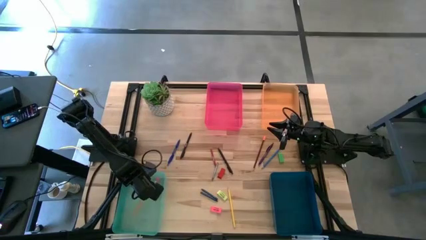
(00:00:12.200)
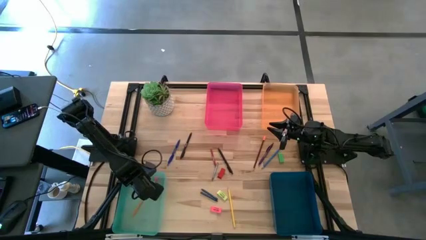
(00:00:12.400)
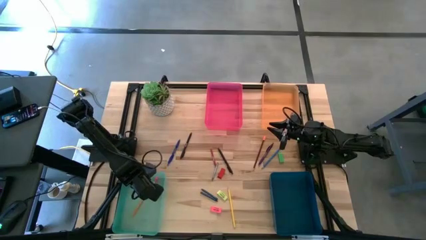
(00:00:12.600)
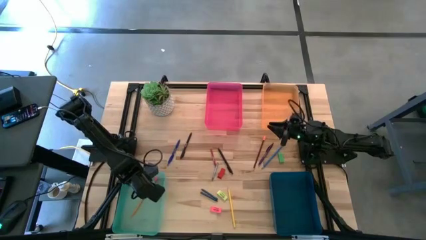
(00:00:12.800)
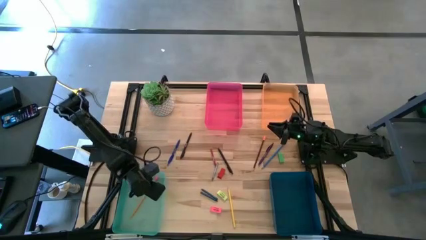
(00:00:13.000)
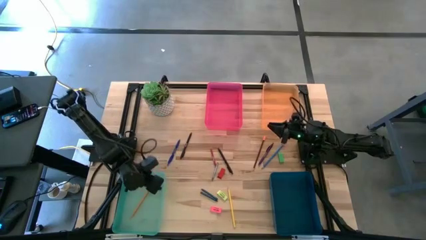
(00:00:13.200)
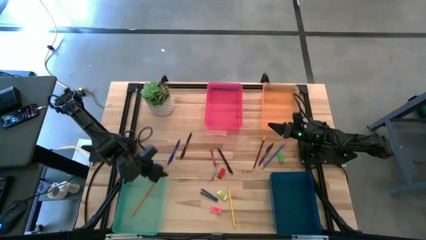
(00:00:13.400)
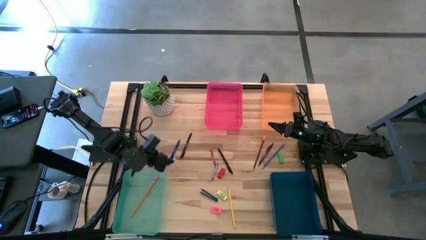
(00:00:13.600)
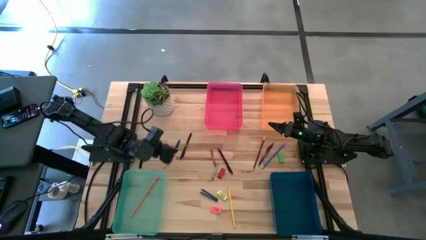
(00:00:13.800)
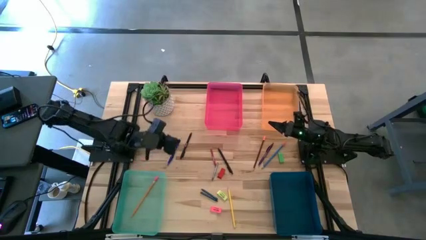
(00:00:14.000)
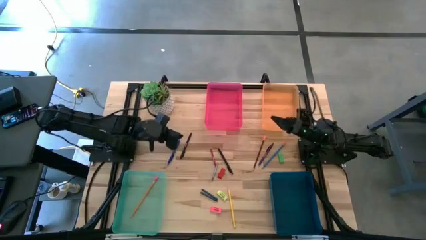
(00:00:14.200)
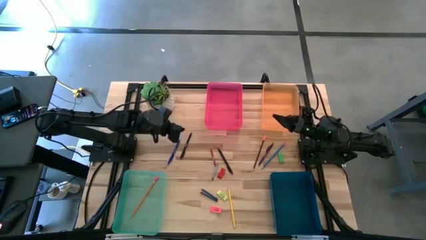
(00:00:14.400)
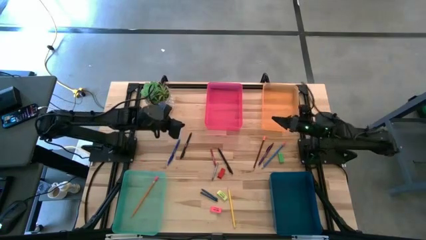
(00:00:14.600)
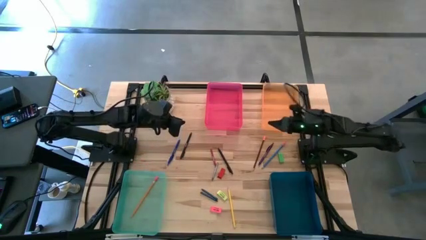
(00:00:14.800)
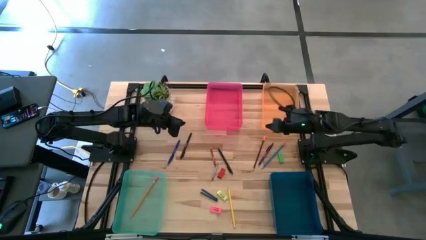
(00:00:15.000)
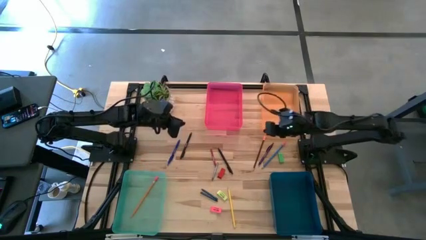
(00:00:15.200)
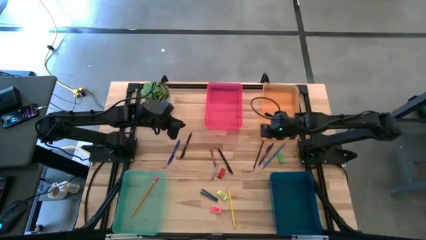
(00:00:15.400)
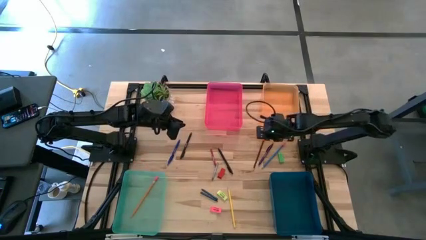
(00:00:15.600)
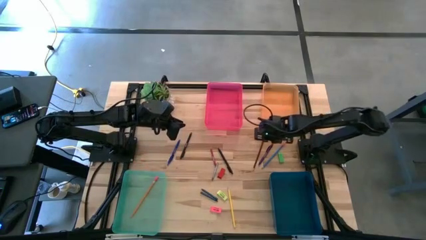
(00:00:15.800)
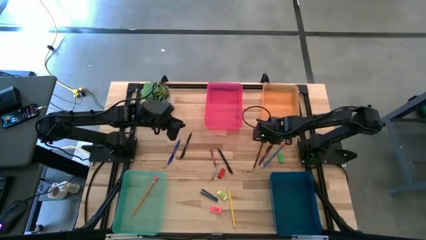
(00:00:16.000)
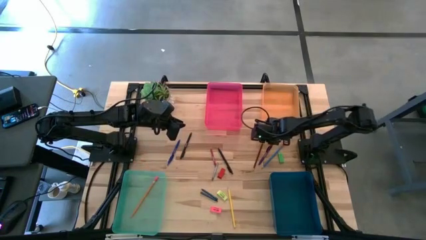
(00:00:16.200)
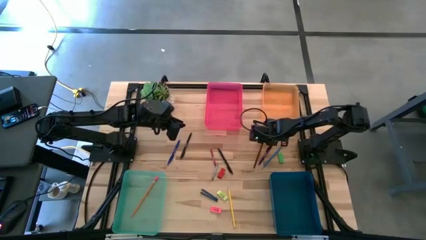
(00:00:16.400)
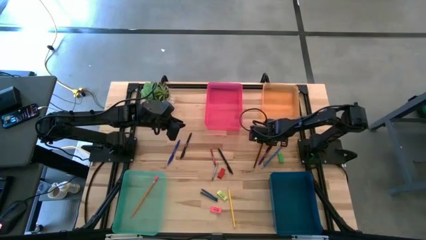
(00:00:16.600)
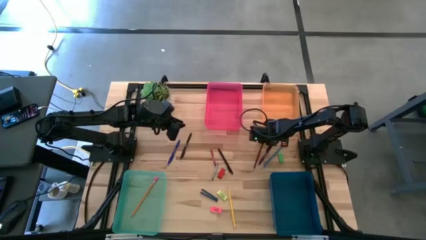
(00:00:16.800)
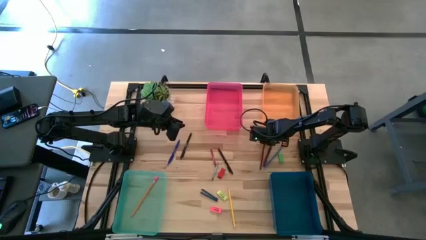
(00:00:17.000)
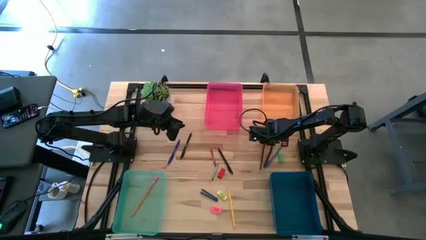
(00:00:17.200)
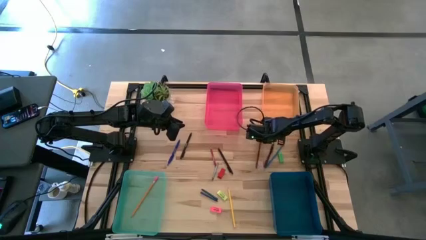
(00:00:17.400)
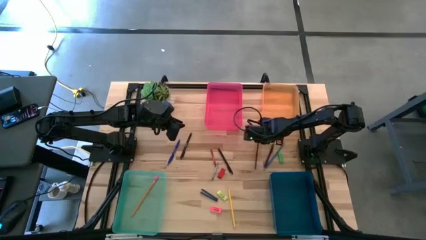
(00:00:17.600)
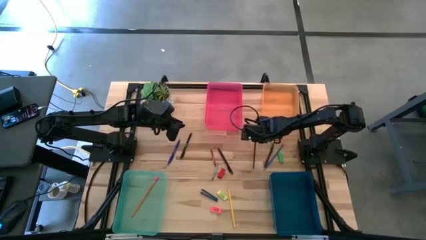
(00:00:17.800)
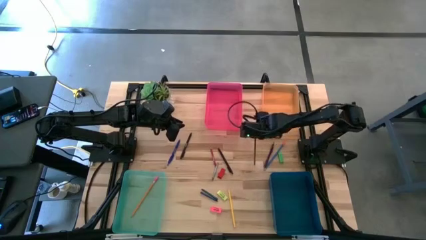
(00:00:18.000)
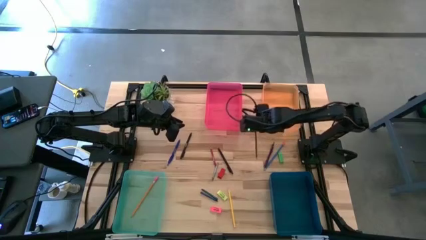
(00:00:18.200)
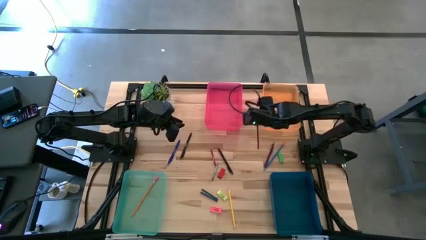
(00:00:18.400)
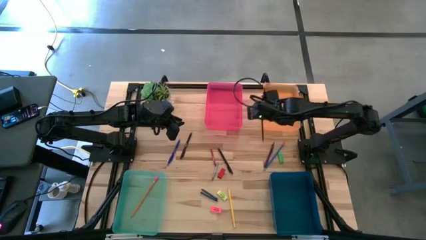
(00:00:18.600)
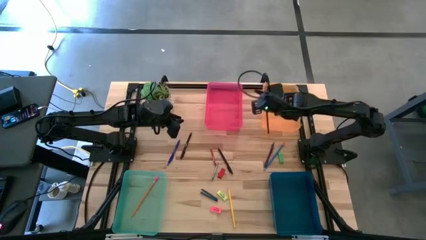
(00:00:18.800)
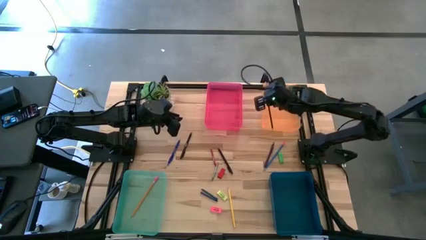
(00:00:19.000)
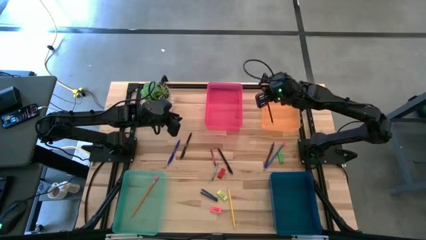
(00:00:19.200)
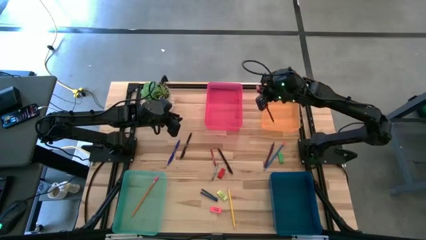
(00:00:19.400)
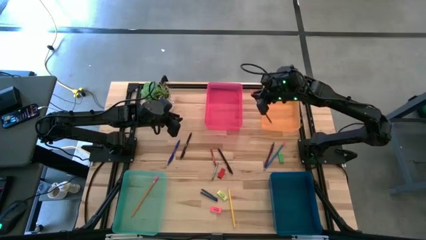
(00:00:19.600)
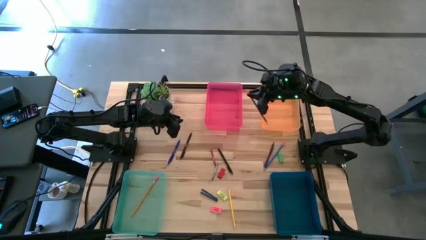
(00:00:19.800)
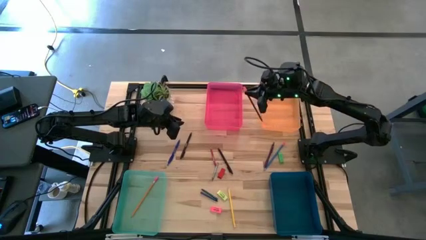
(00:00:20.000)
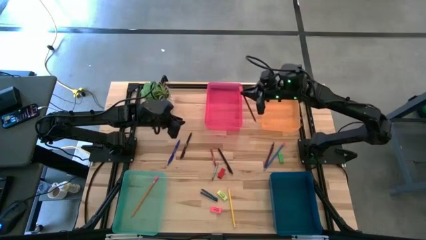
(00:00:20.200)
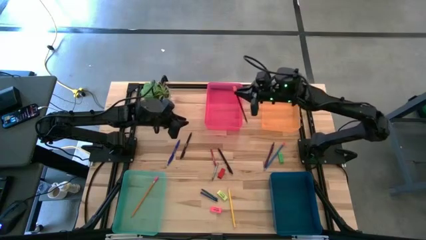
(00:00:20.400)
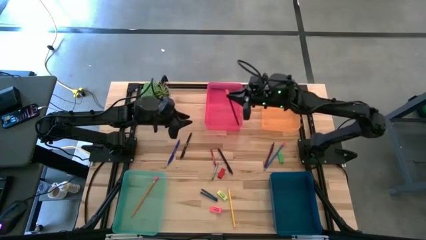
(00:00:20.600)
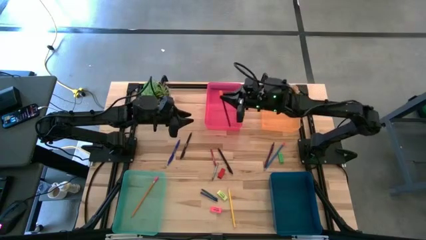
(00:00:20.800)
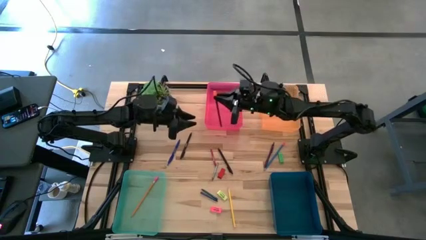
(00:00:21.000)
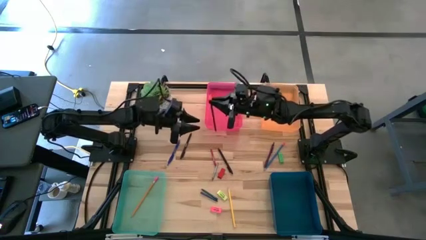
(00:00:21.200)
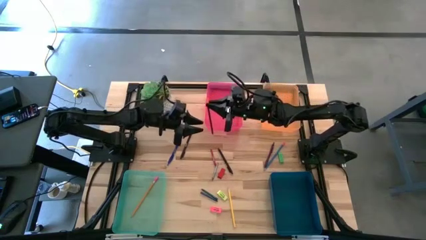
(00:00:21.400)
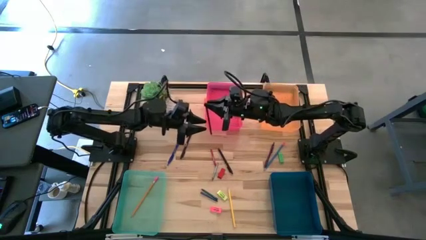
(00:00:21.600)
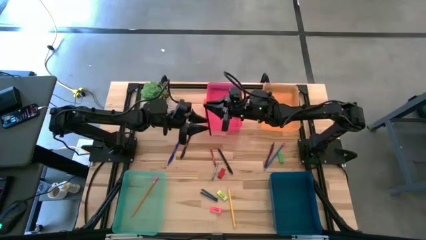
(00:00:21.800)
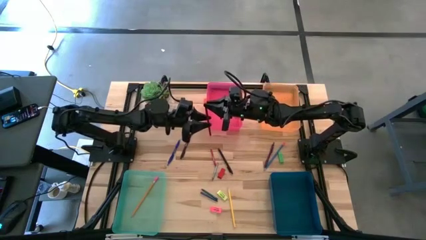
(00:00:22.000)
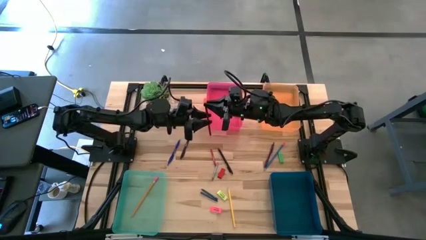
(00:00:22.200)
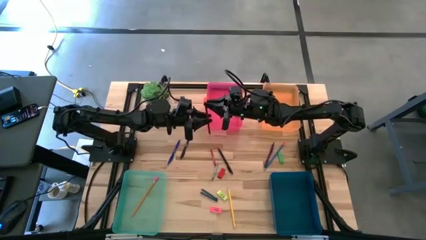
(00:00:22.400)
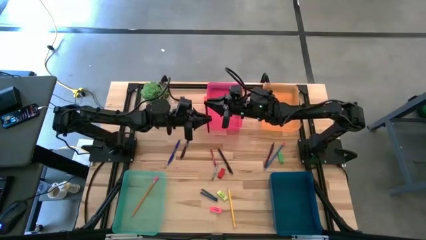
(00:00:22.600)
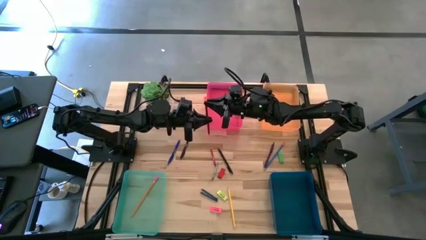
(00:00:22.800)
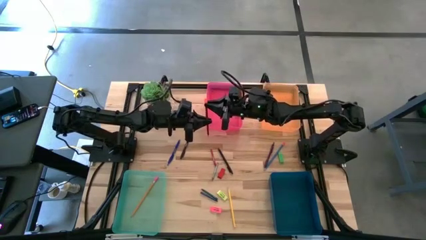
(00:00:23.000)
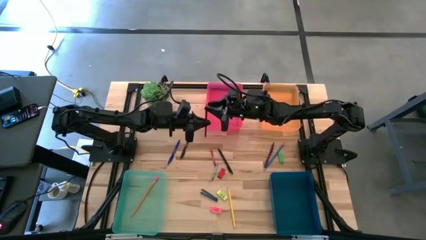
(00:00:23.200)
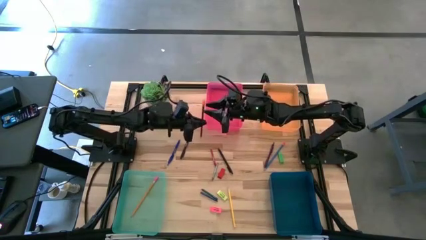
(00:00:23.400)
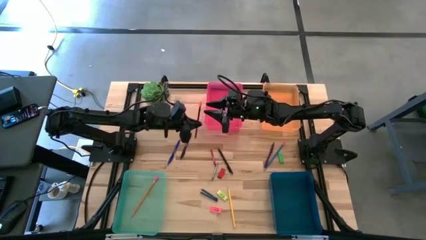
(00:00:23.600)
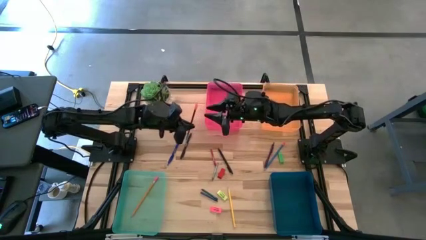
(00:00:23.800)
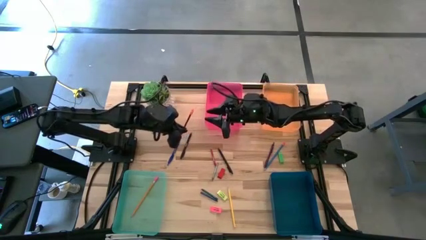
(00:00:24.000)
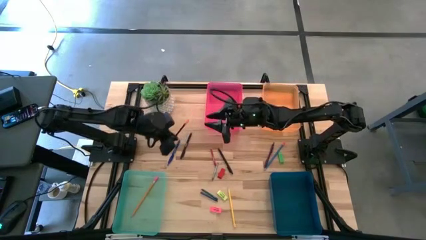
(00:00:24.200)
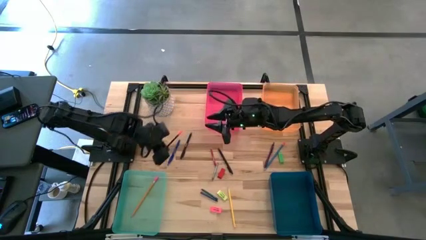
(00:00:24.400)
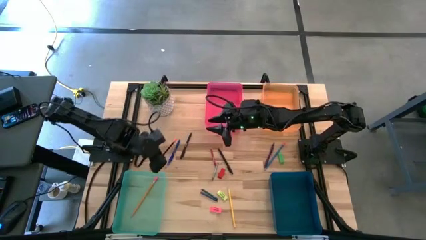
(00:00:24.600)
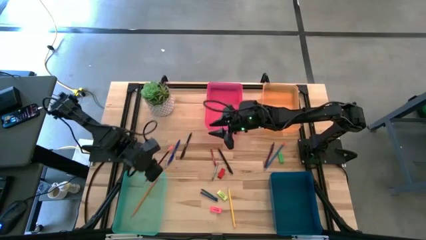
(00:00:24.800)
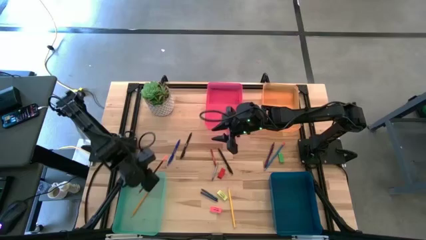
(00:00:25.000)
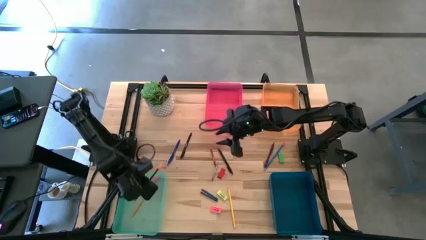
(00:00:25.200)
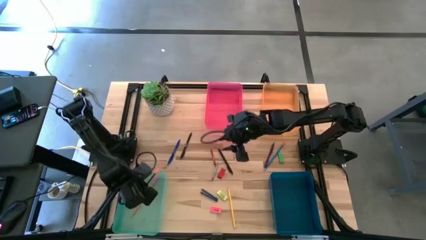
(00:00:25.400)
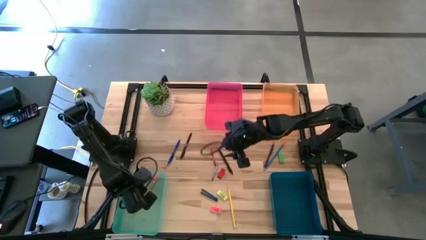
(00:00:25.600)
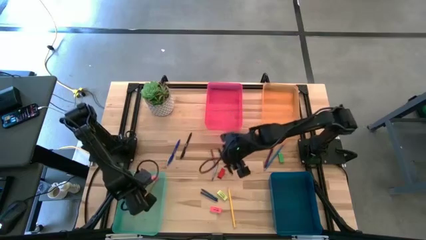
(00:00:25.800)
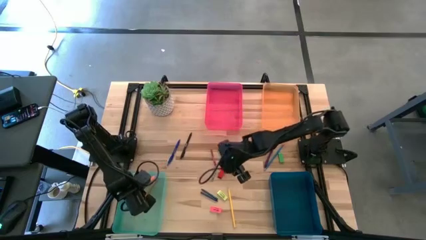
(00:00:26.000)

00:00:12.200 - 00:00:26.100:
Task: Sort crayons/erasers/pens/pencils in bins
Put the brown pencil into the green bin bin
